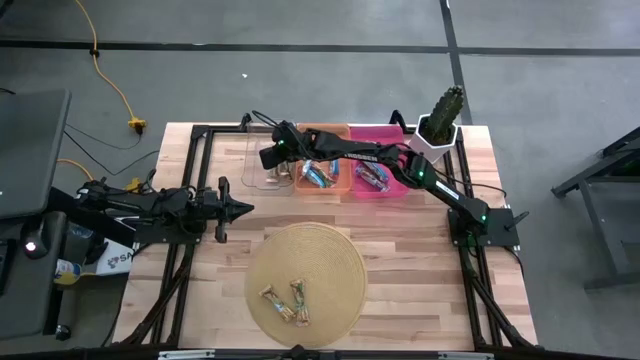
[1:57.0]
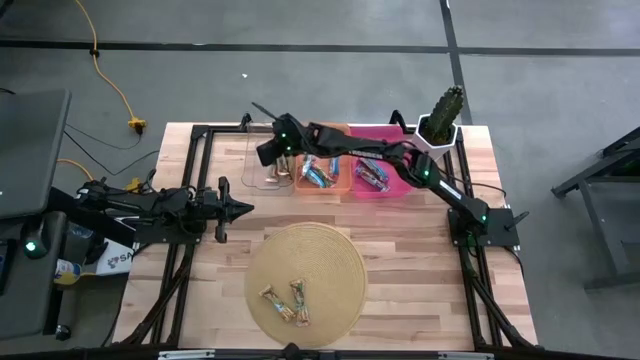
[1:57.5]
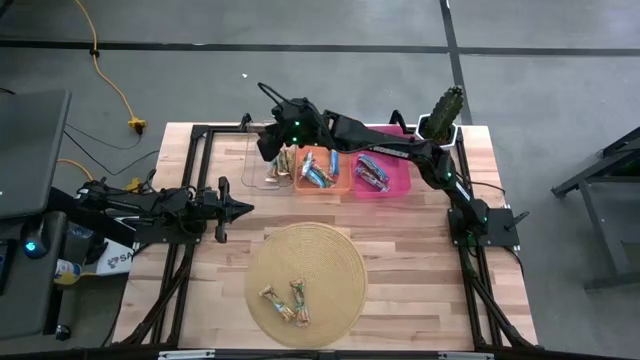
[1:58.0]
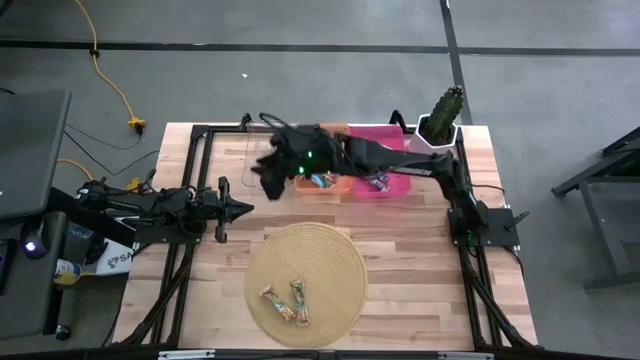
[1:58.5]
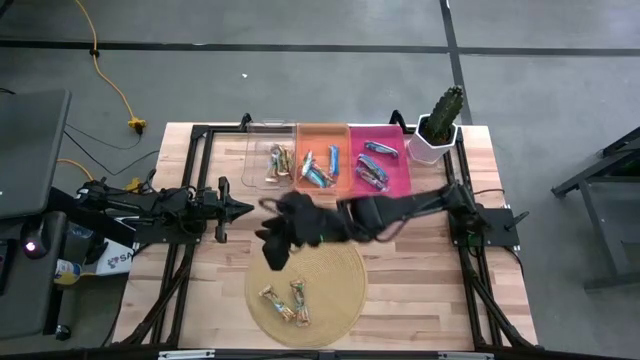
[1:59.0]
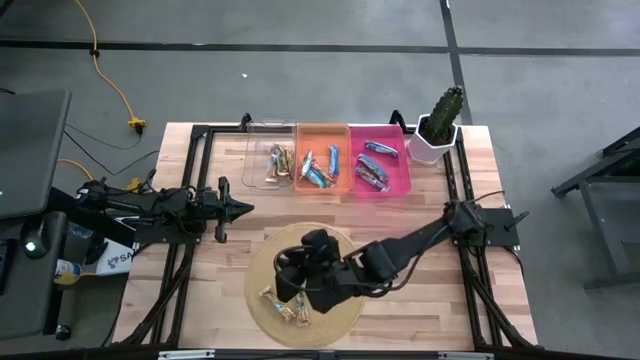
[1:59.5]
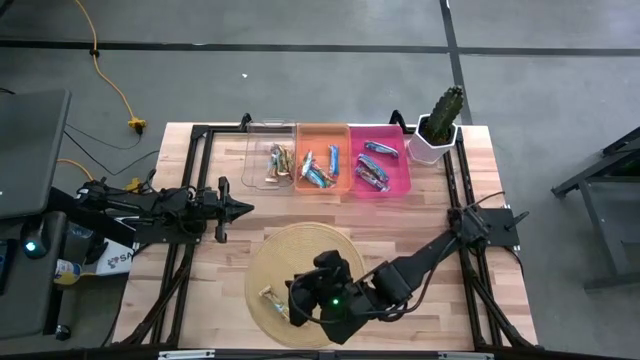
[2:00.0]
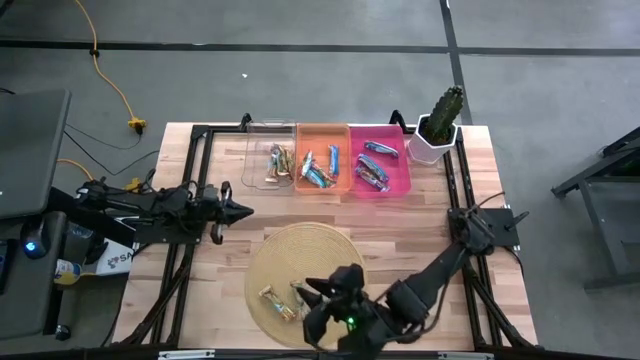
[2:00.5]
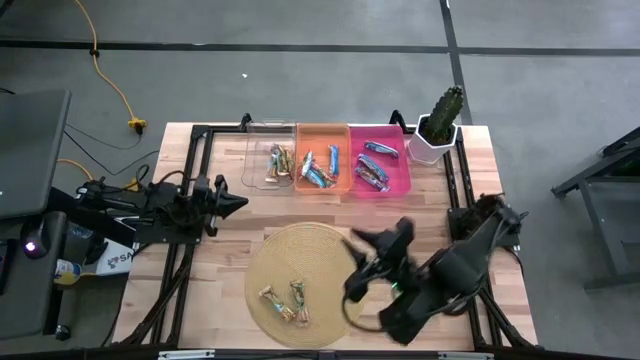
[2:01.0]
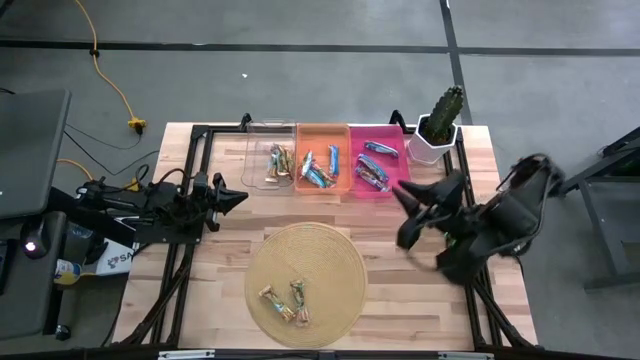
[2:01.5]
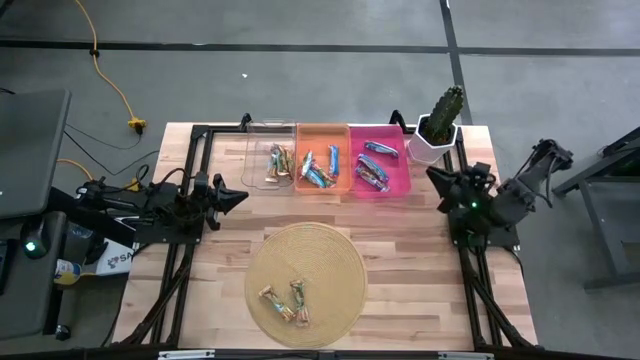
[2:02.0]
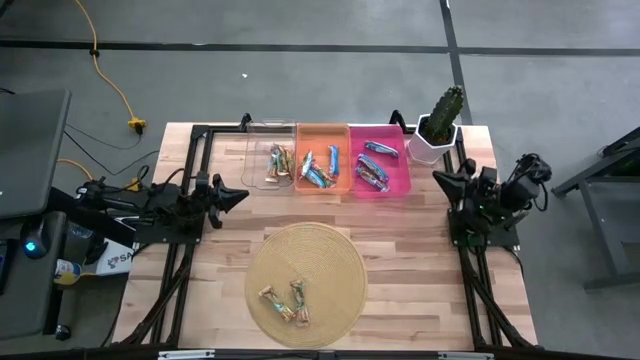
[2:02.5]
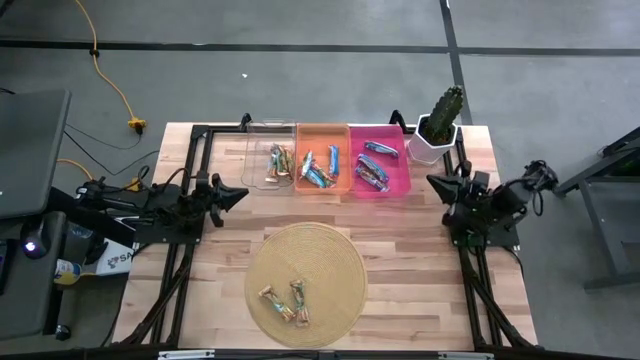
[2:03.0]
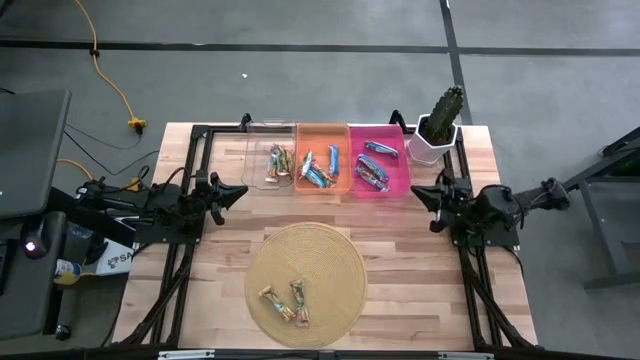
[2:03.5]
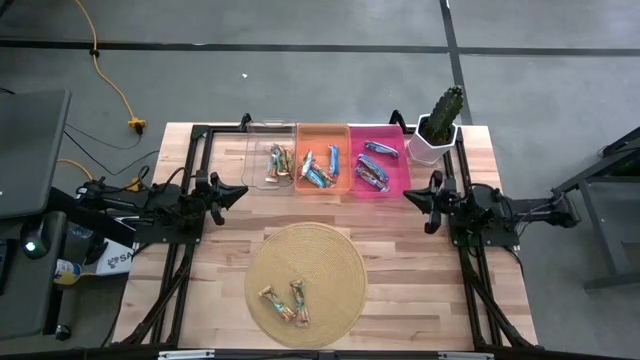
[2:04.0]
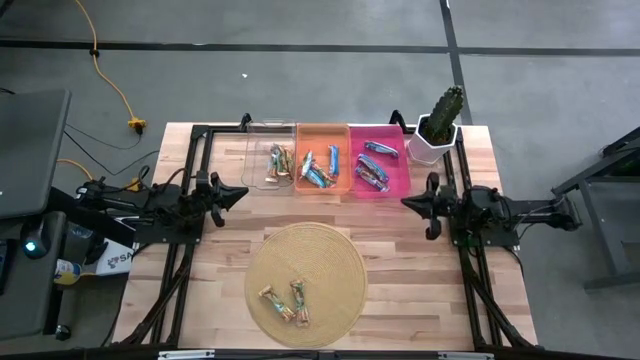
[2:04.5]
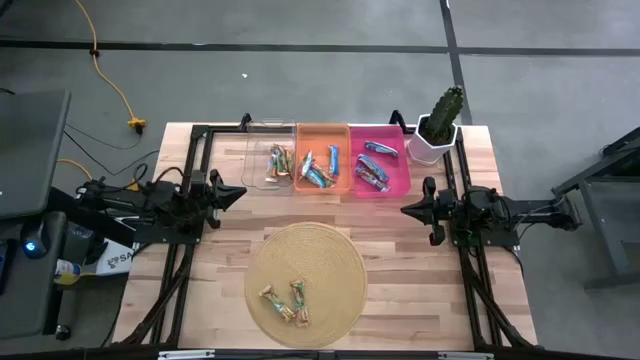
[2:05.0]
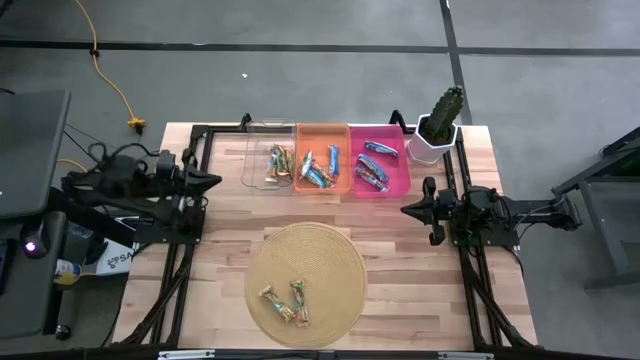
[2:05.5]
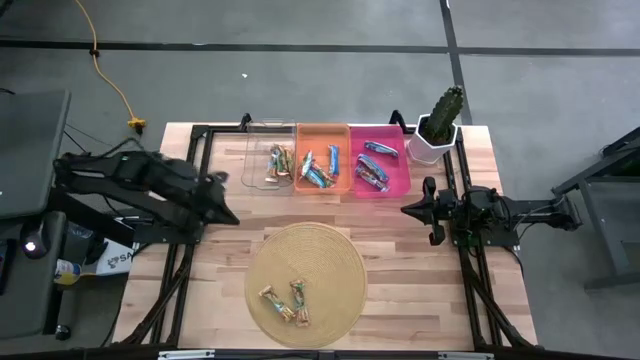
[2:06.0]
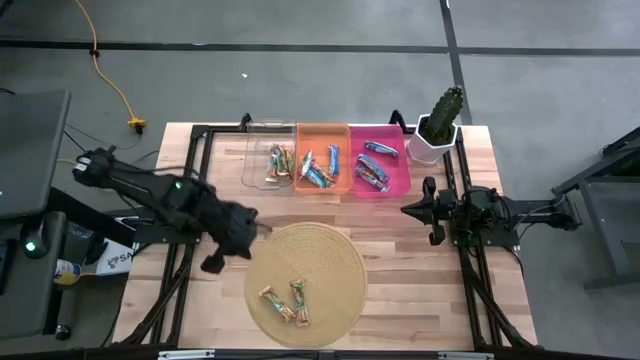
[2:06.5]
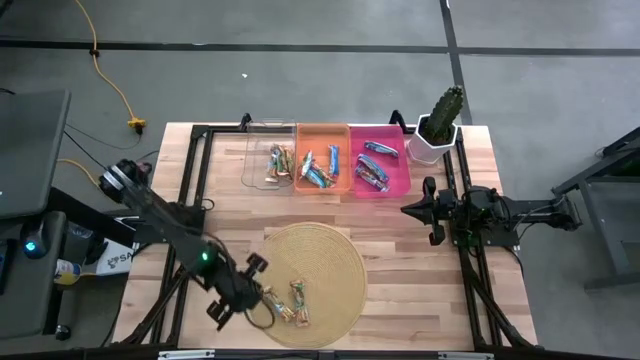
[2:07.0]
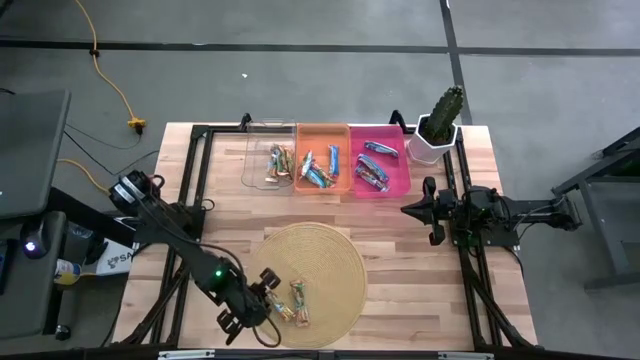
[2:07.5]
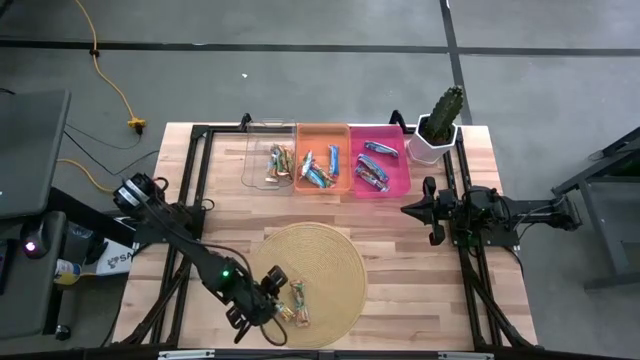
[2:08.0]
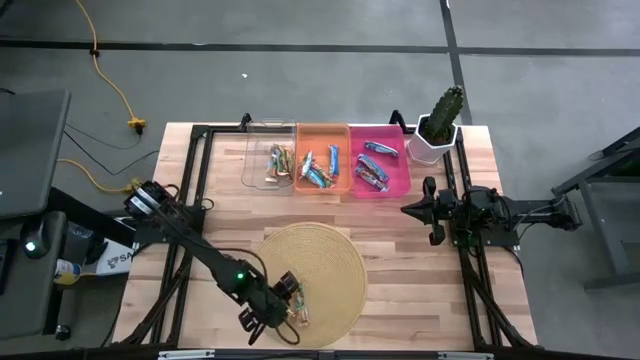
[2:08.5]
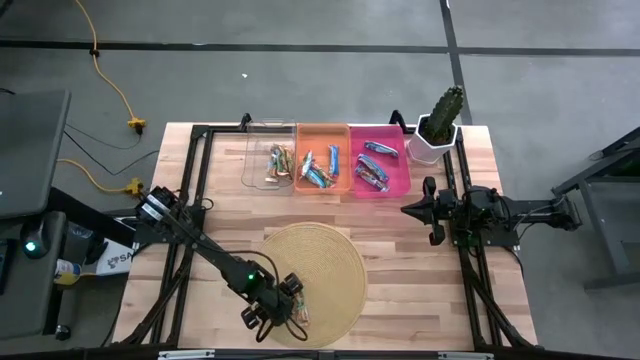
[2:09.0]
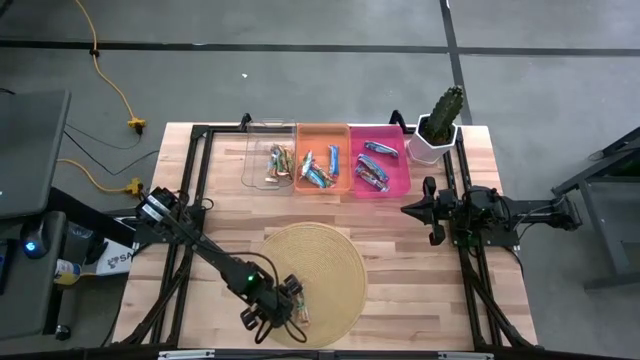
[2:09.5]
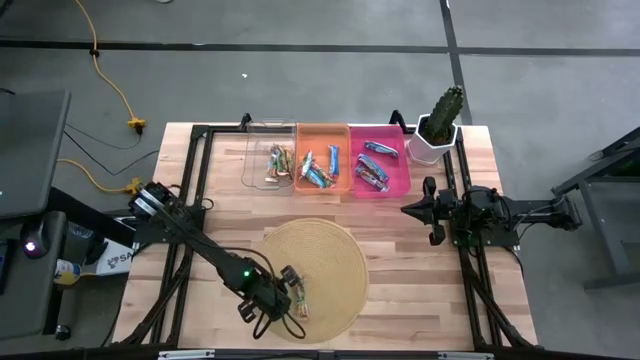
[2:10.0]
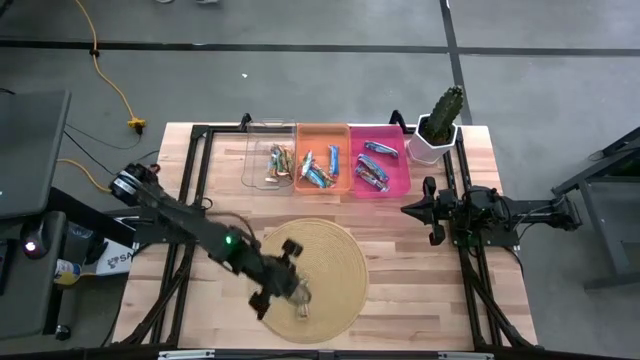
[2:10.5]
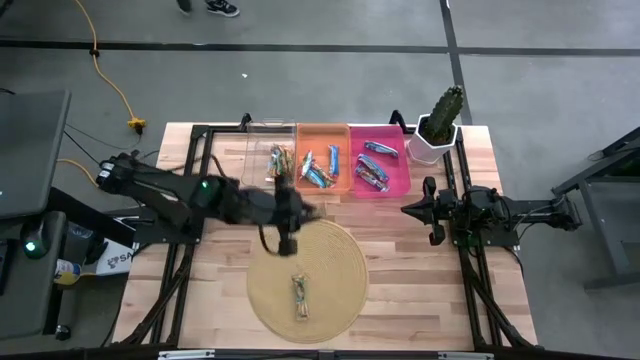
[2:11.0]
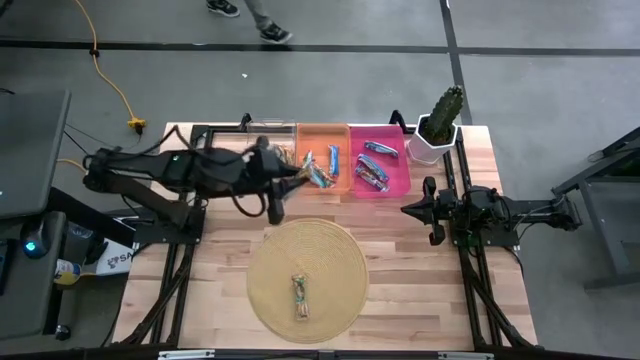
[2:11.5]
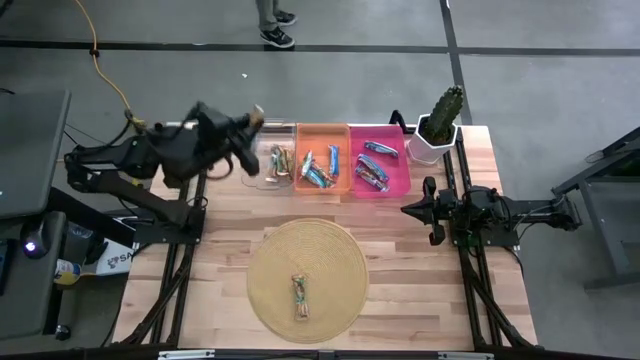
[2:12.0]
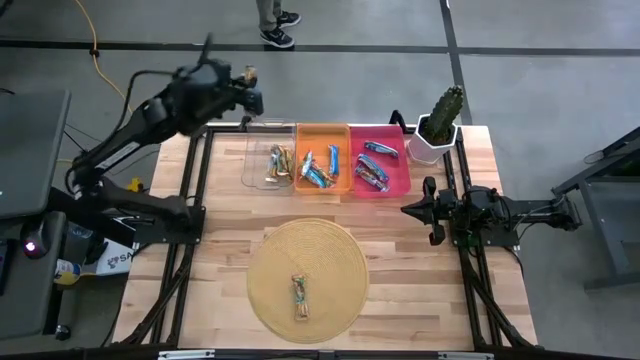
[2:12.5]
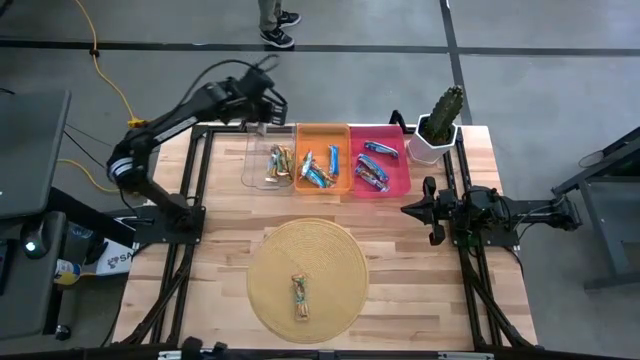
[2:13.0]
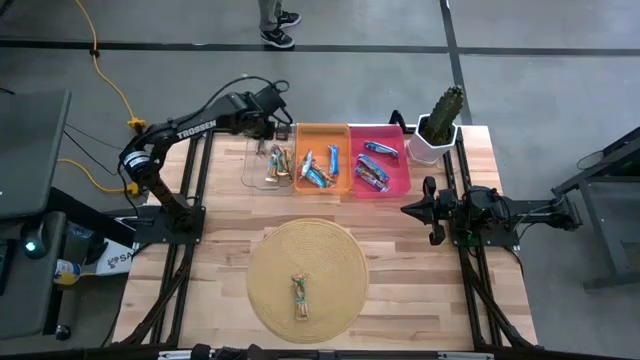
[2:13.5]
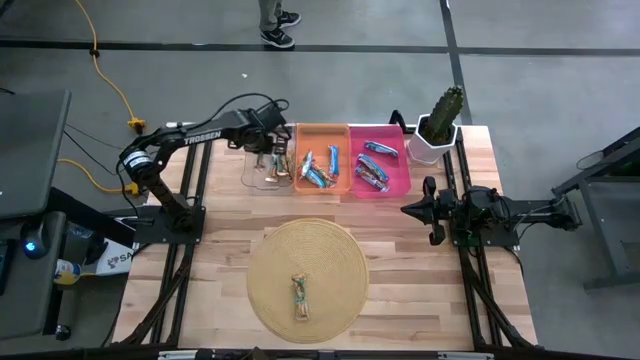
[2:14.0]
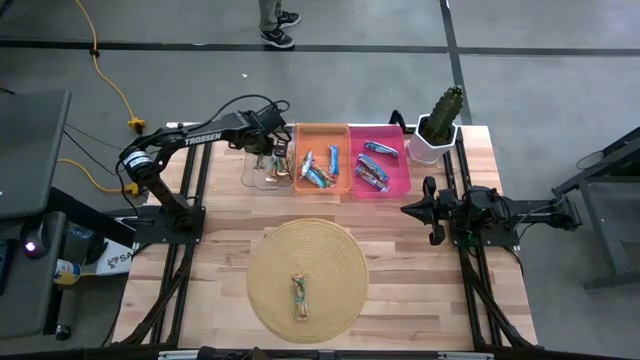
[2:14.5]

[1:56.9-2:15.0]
Task: Pick and place Granola Bars by type
Put the yellow granola bar into the transparent bin

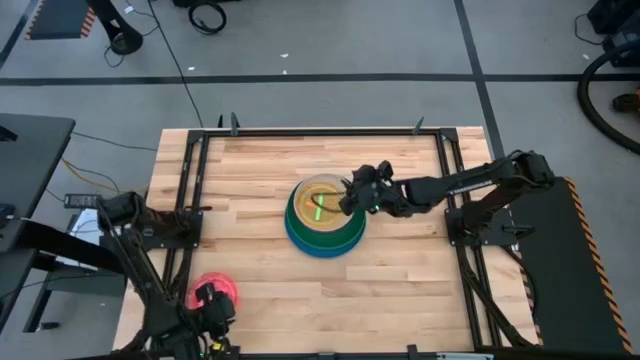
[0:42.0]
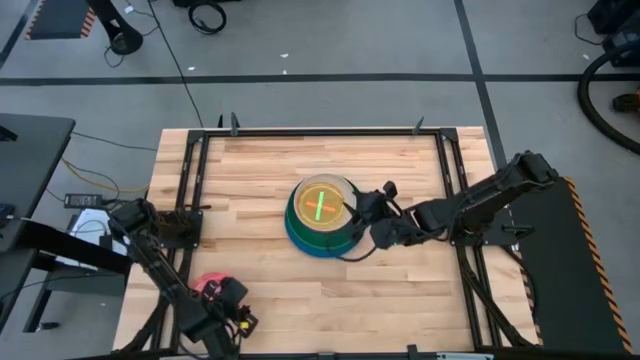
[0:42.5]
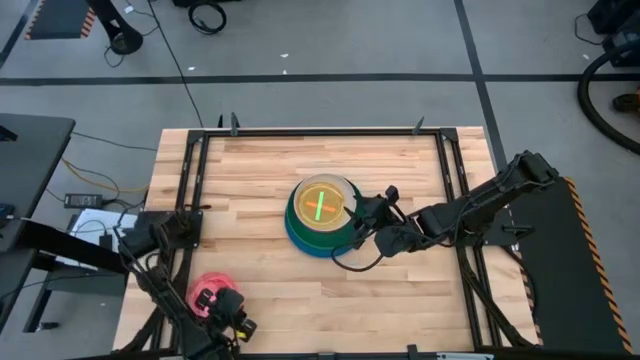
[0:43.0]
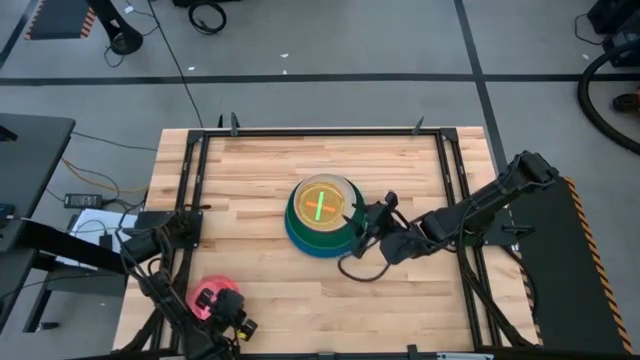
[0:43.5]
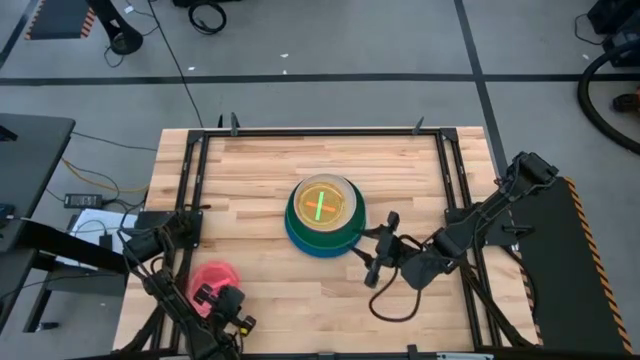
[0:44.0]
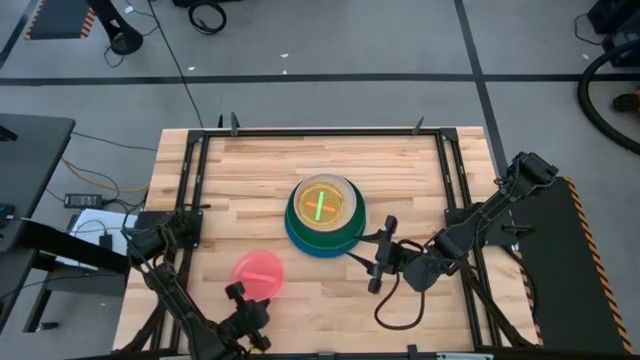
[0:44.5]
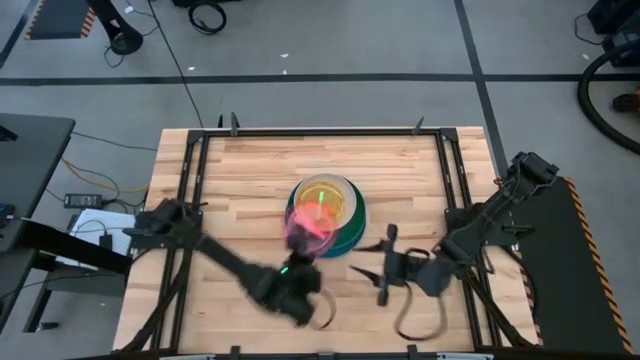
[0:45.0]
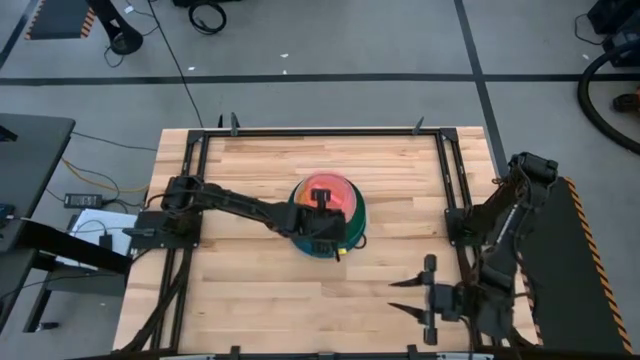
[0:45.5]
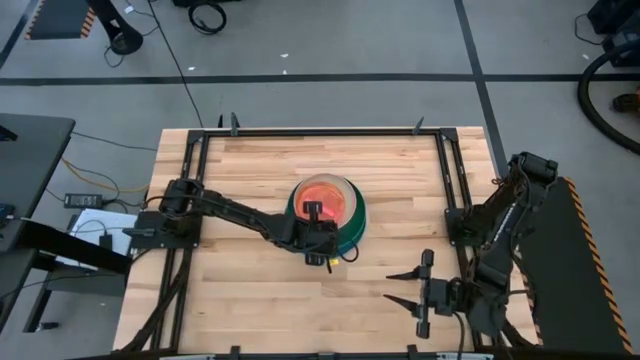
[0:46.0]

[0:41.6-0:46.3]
Task: Stack plastic plates
Stack the transparent red plate on top of the transparent green plate
